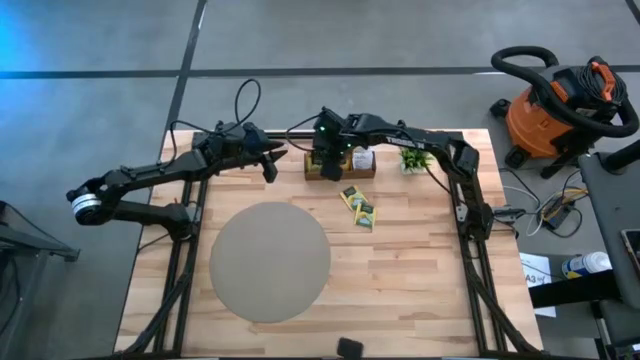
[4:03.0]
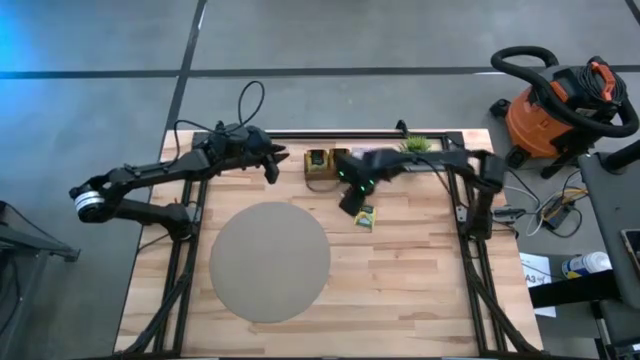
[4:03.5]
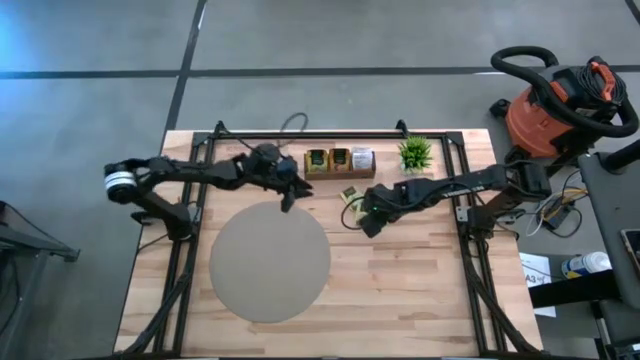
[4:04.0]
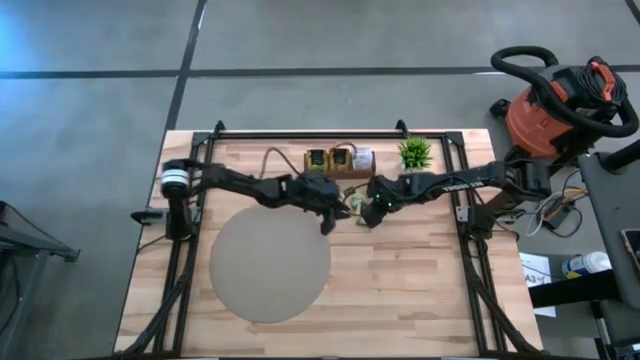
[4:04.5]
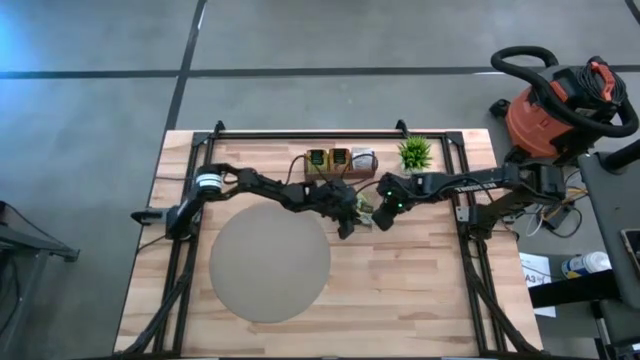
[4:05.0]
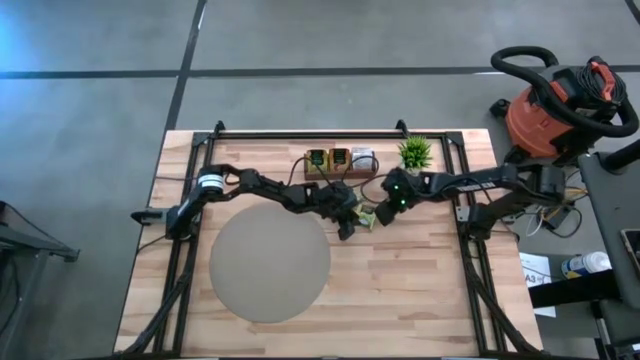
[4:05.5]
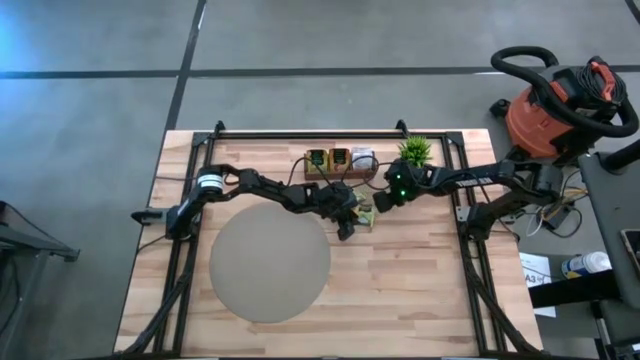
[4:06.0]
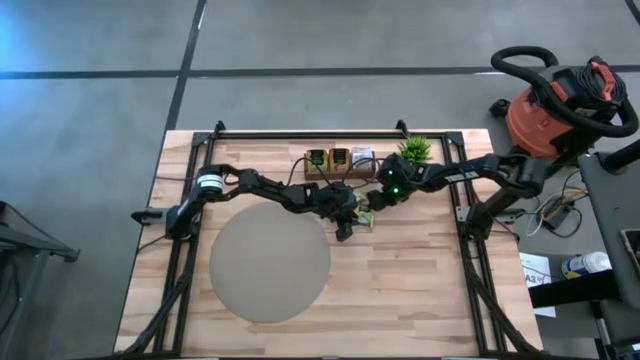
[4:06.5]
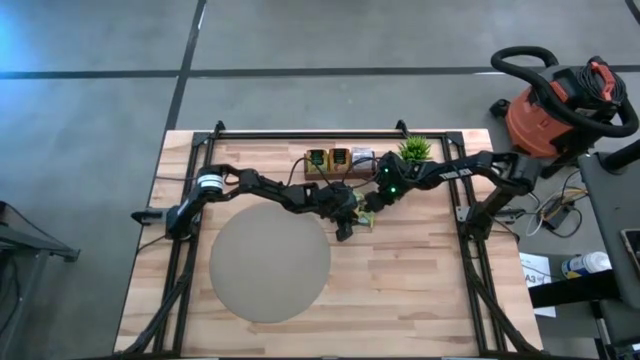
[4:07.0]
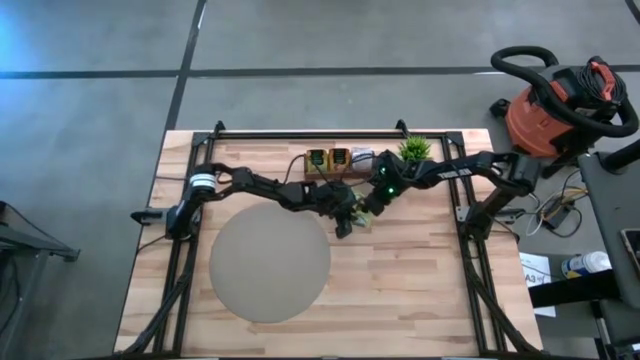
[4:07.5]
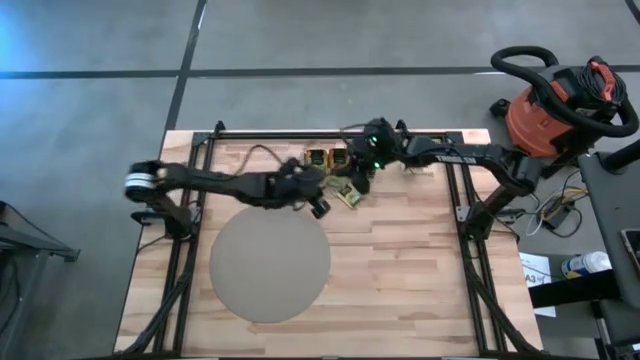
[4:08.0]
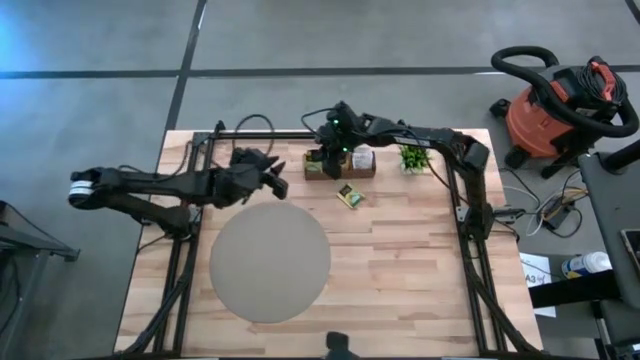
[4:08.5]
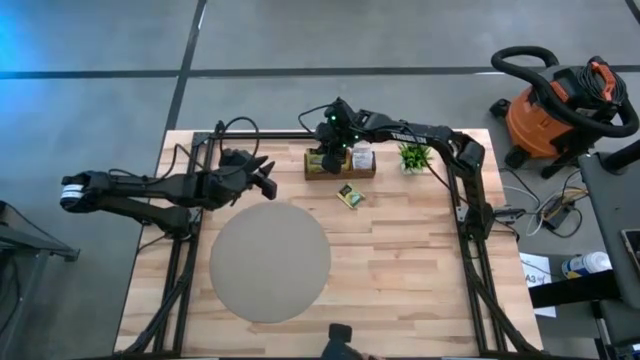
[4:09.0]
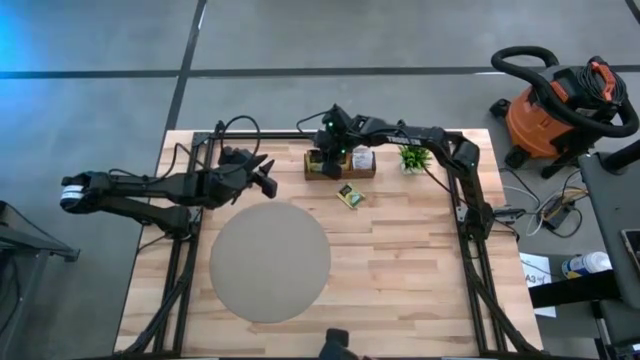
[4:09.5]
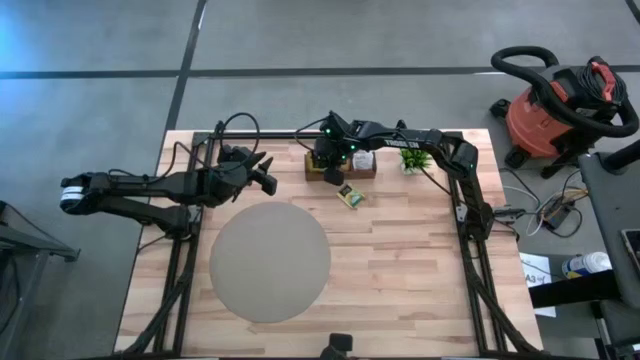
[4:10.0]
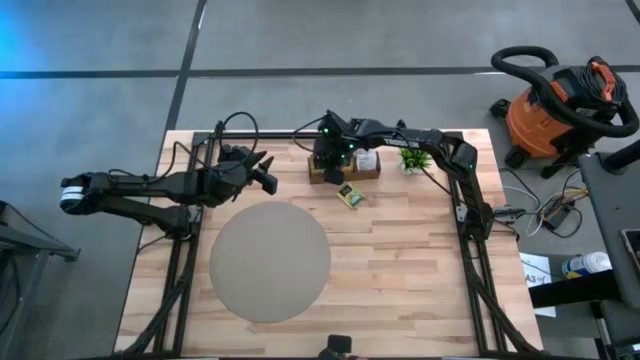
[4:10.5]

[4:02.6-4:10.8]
Task: Pick & Place Tea
Put the yellow tea sachet into the left compartment of the wooden organizer

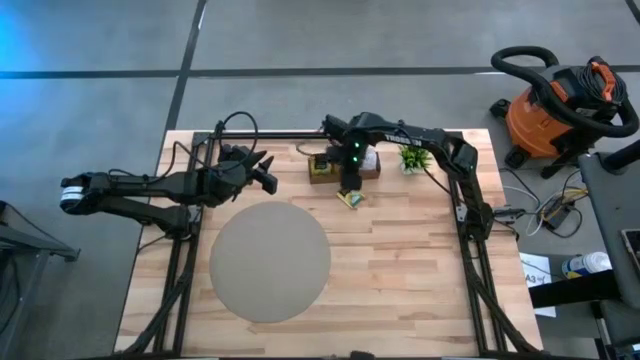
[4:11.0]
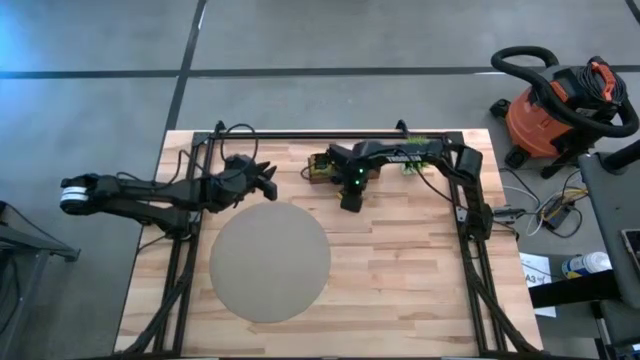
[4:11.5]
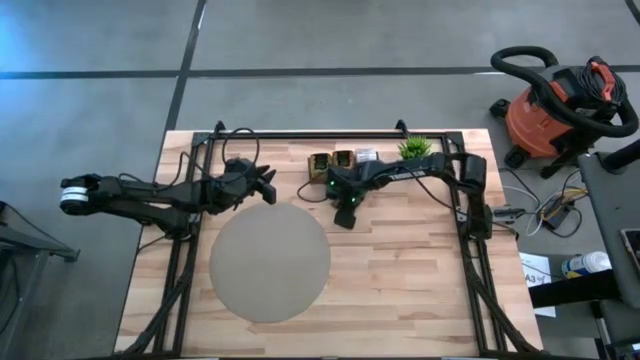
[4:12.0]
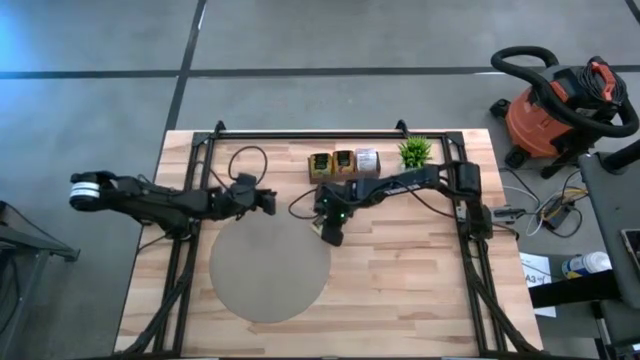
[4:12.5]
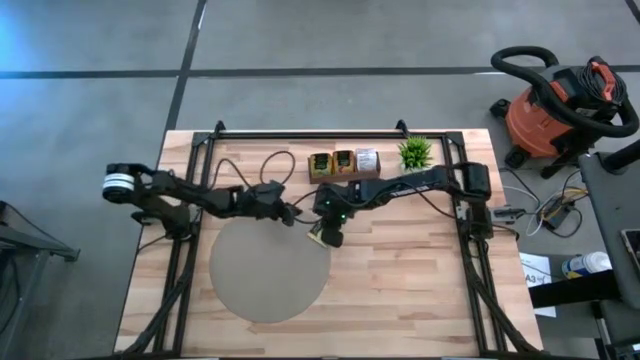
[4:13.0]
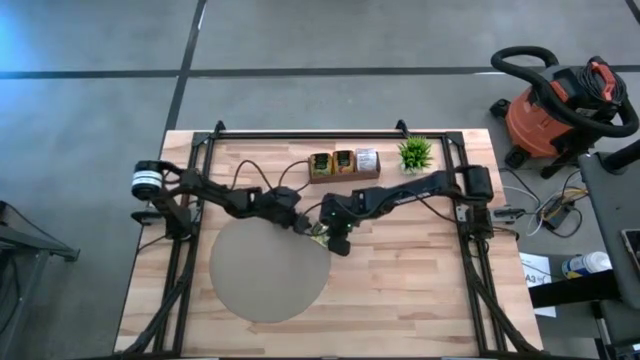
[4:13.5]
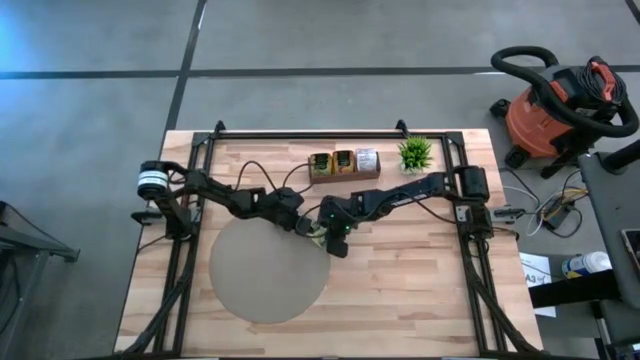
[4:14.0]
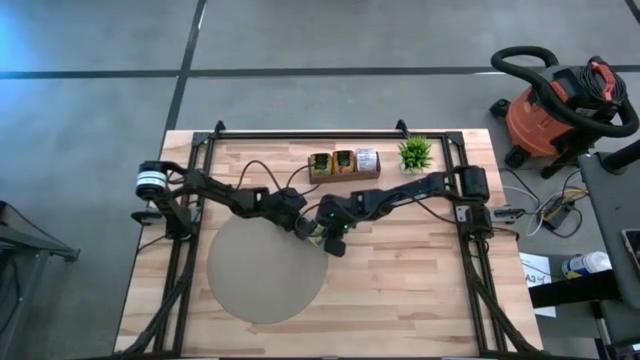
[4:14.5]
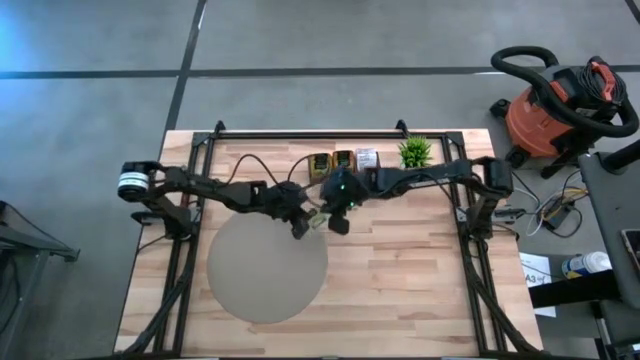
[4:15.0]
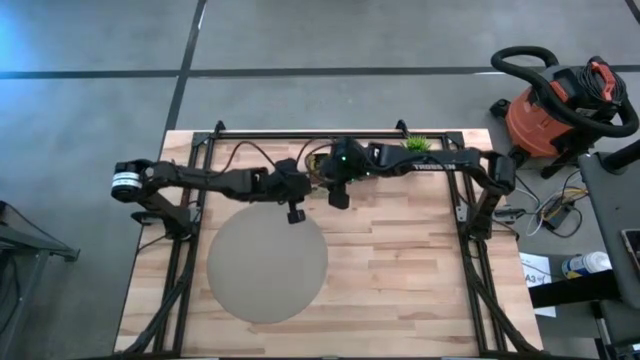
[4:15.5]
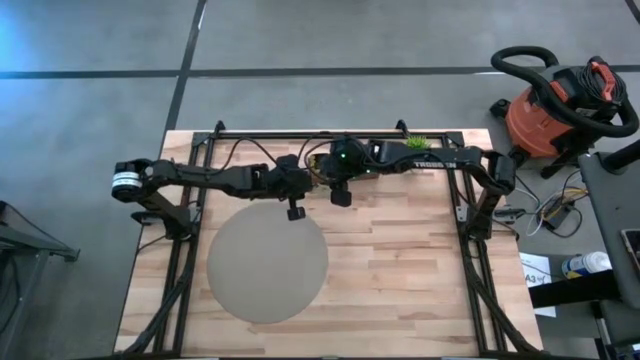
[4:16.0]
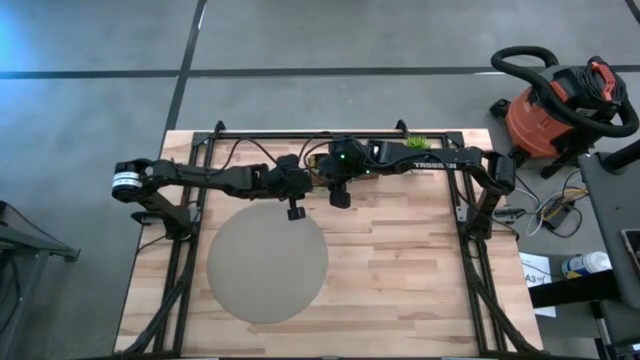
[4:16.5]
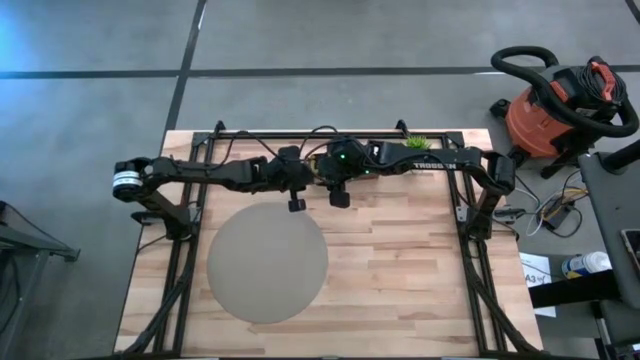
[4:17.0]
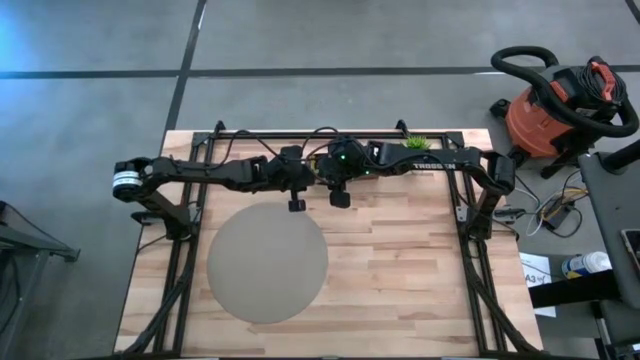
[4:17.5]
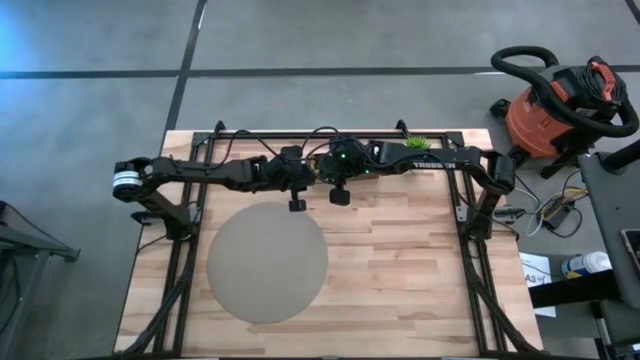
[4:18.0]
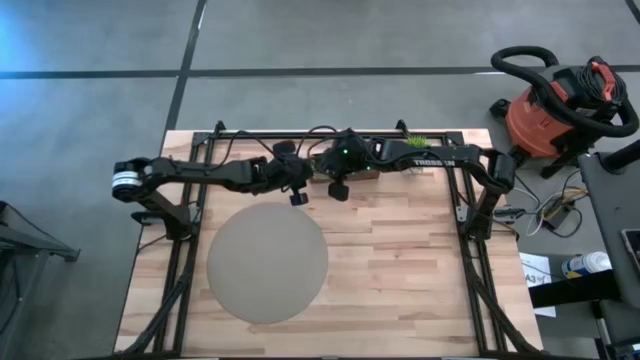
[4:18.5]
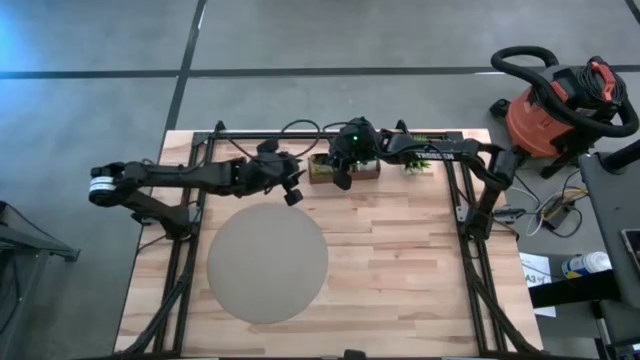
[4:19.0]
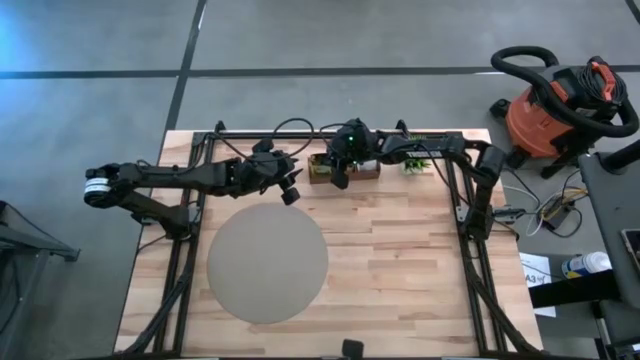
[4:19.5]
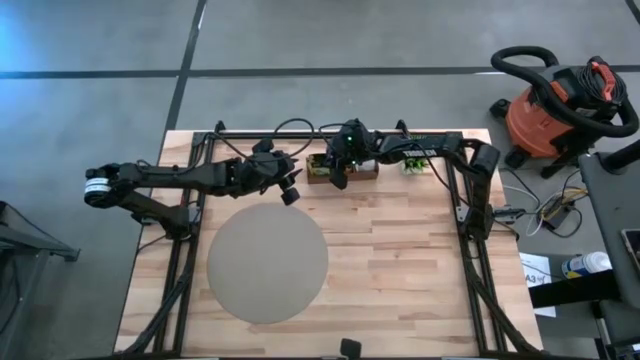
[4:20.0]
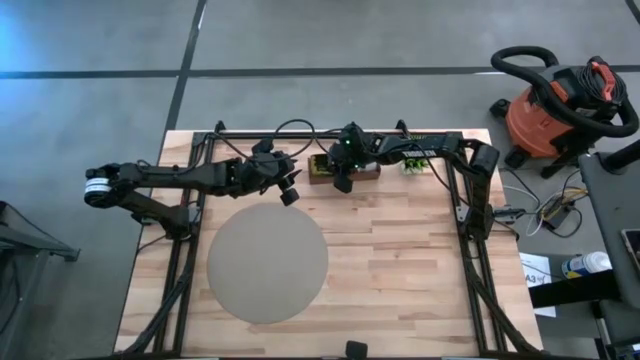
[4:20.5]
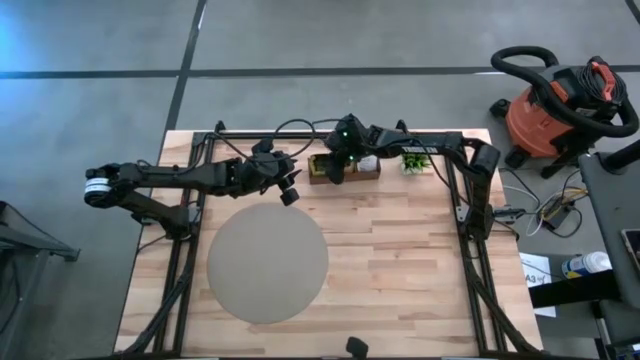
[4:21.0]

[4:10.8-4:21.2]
Put the yellow tea sachet into the left compartment of the wooden organizer

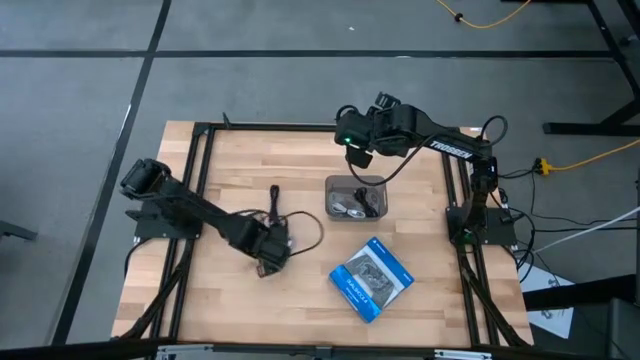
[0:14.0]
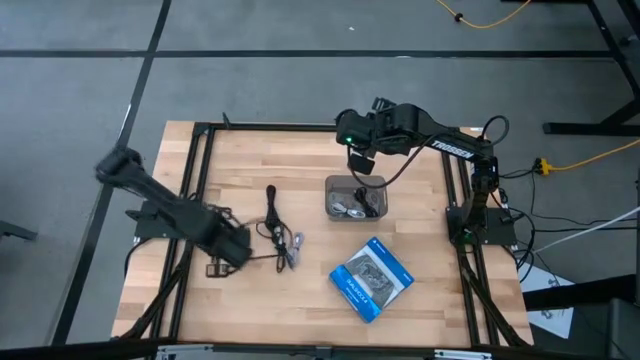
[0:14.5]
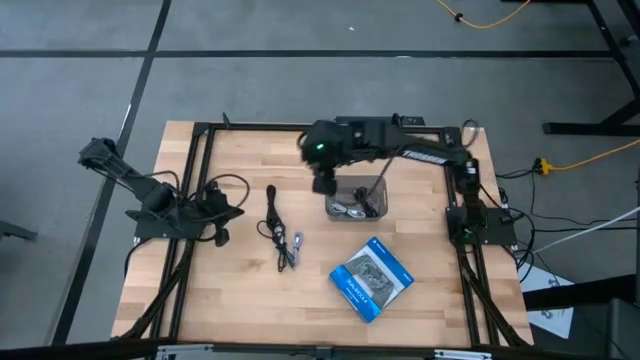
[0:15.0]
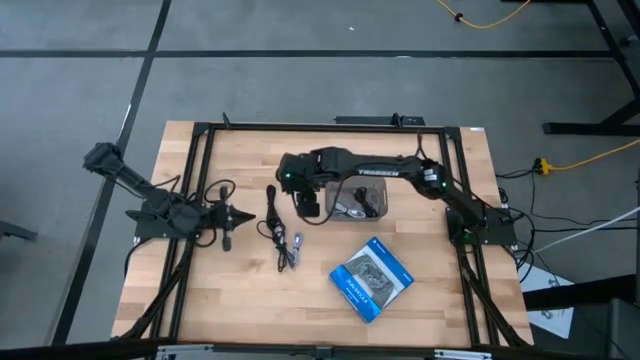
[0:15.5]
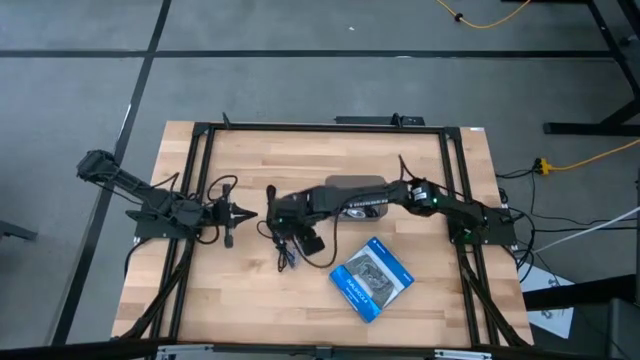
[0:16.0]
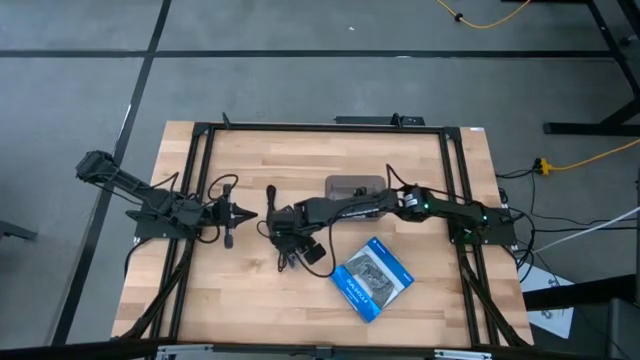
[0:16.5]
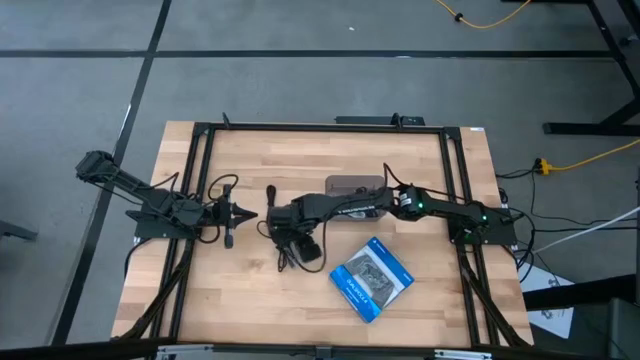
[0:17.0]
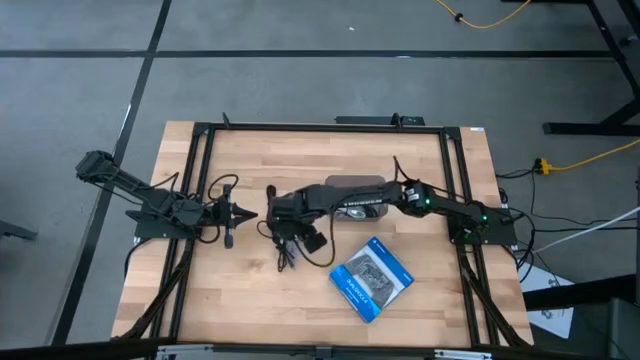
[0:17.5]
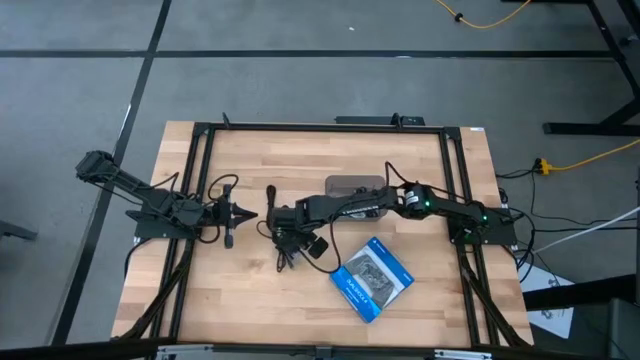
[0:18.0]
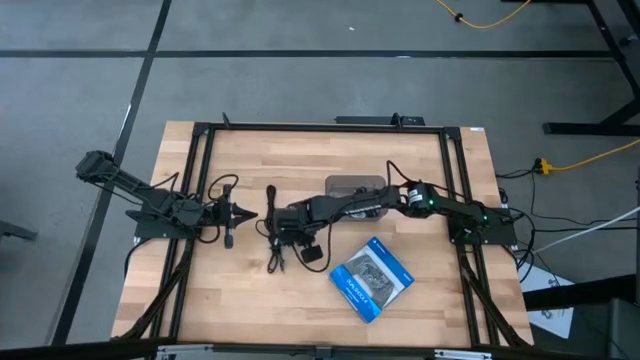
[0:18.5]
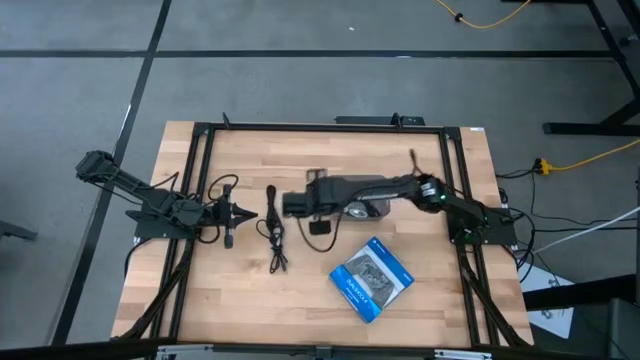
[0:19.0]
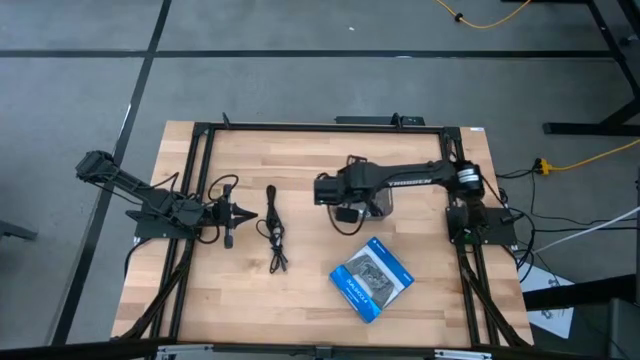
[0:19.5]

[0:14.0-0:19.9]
Task: Pick and place USB-C Cables
Put the light blue charger cable into the gray bin
